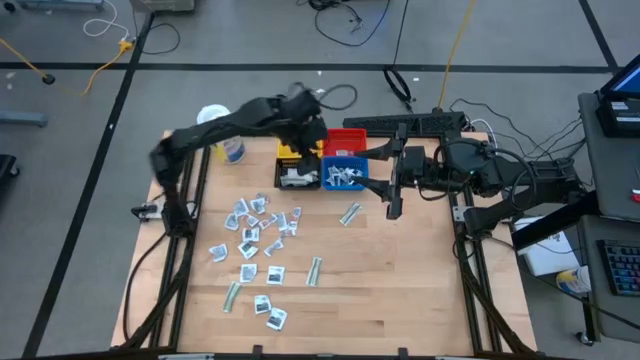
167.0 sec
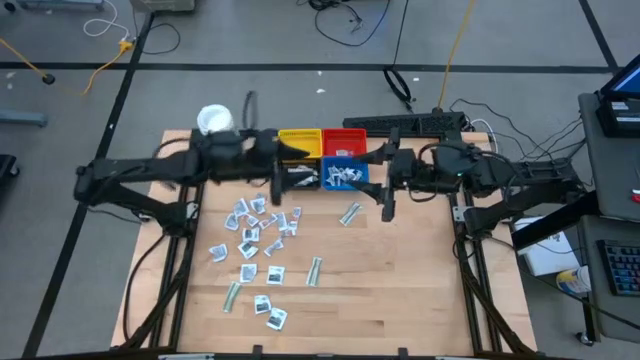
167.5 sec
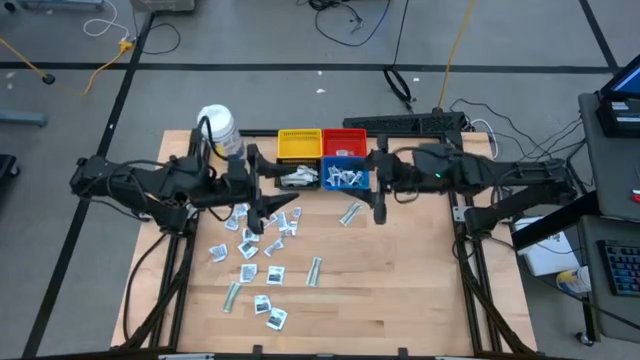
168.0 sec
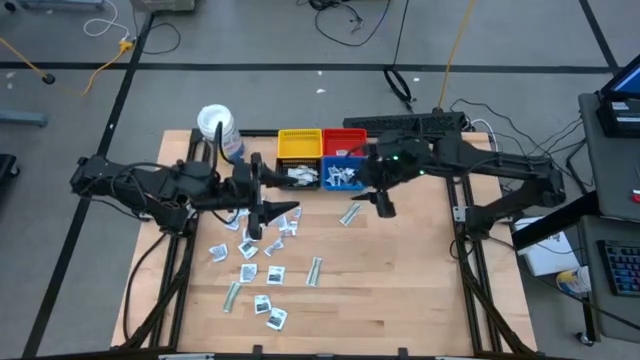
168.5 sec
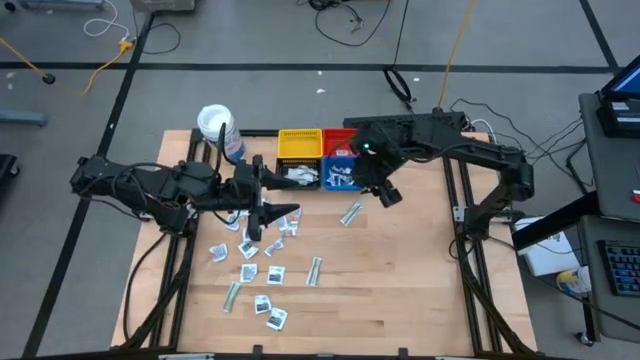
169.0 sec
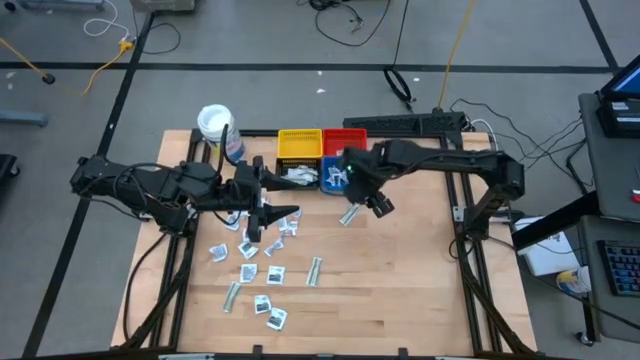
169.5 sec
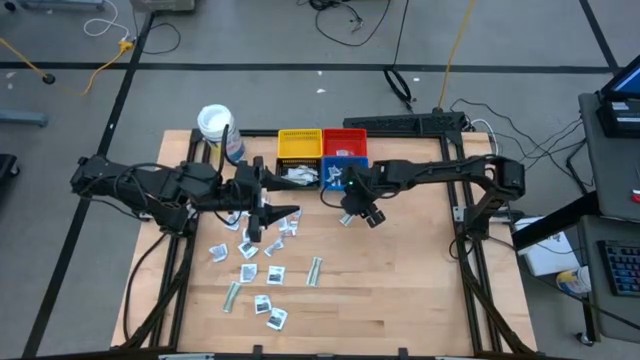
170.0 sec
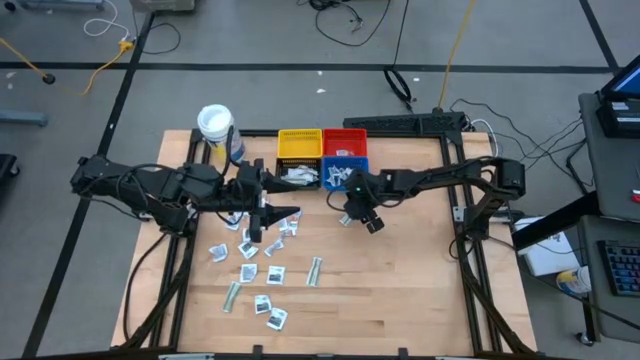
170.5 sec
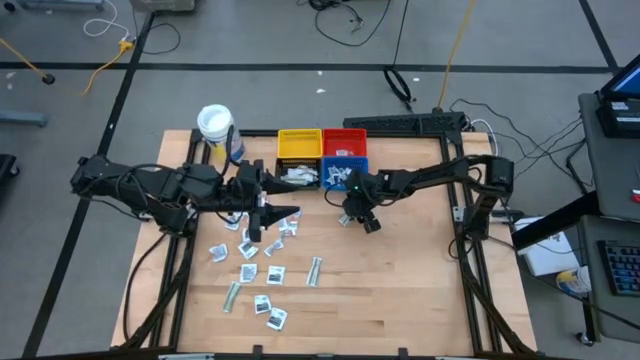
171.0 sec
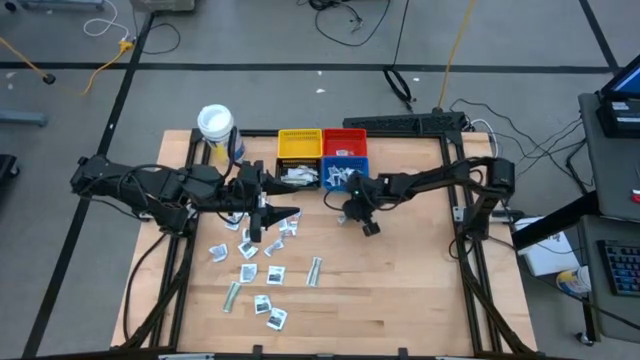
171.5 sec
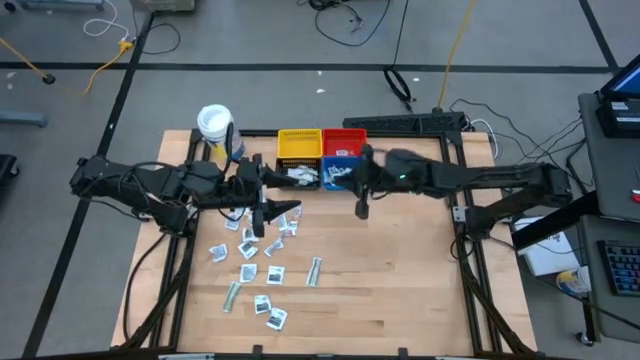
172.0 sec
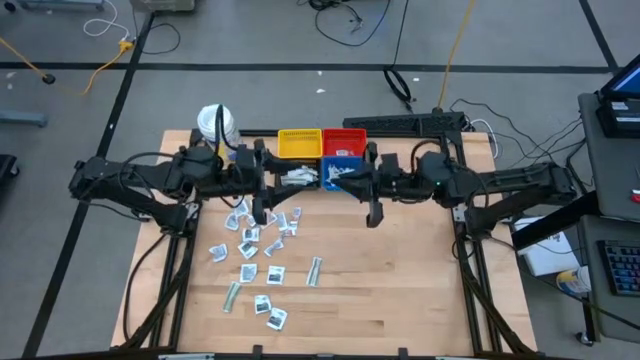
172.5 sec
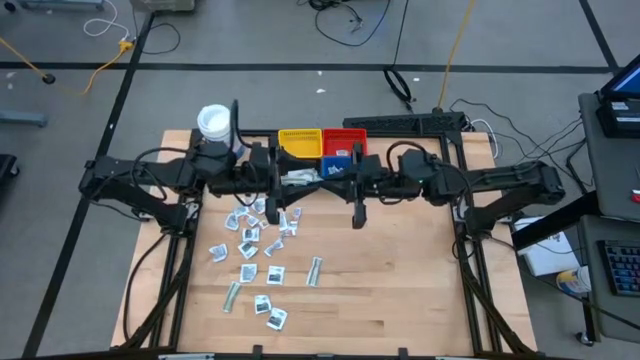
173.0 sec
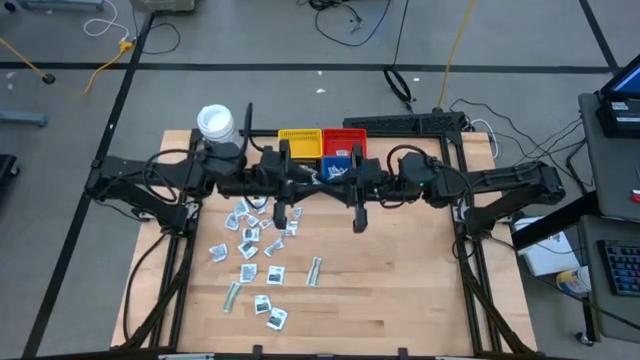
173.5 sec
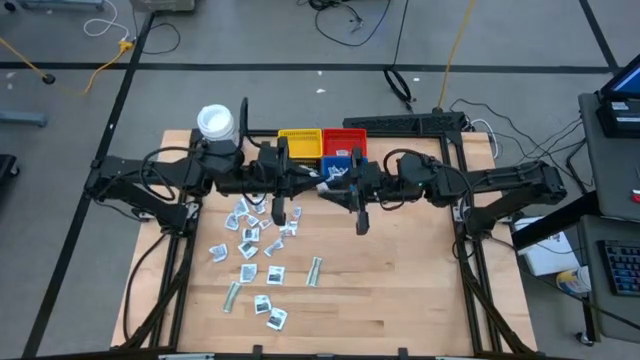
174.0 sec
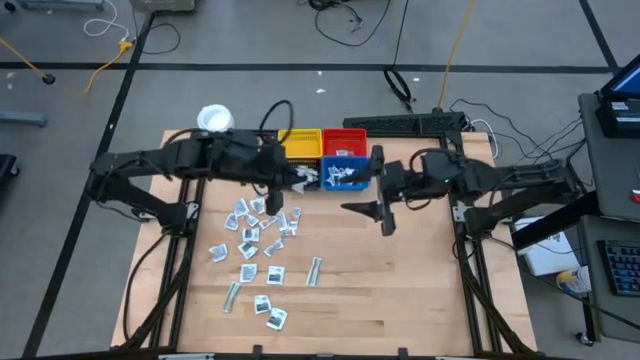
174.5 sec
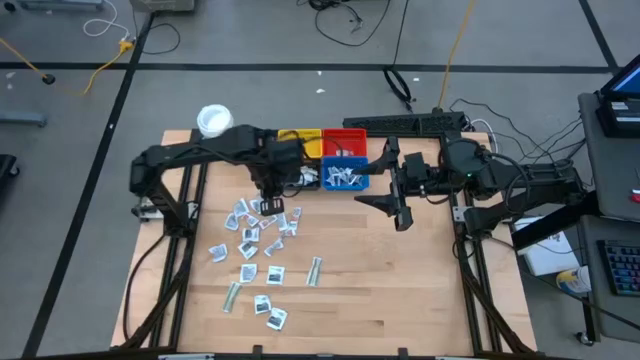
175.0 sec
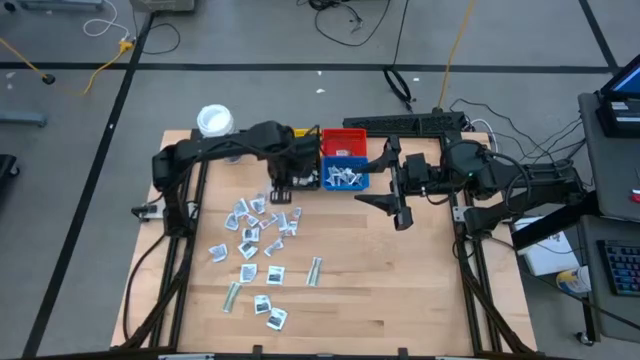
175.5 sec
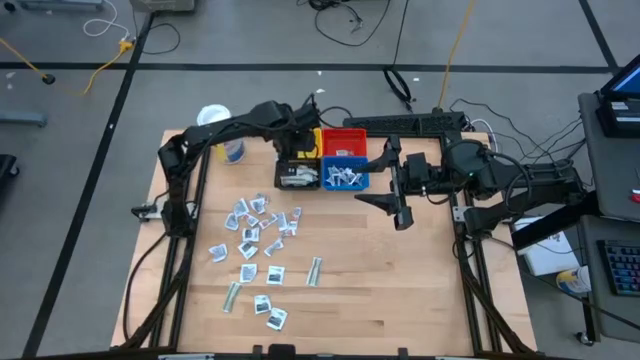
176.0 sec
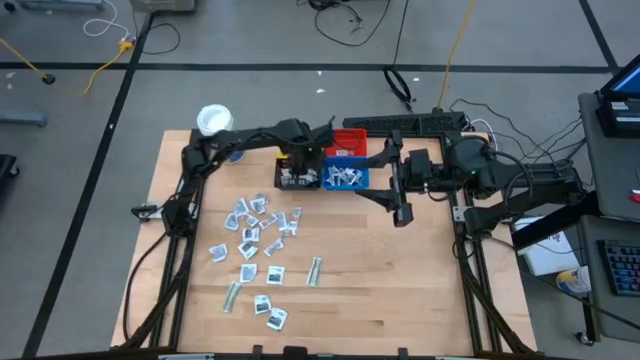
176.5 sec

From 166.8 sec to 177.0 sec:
Task: Pick & Place First Aid Supplies
Put the green bandage pack into the black basket

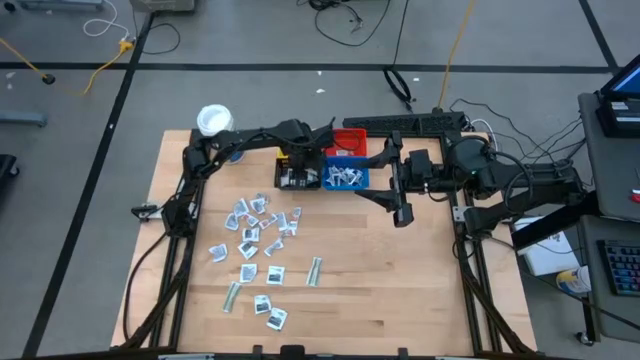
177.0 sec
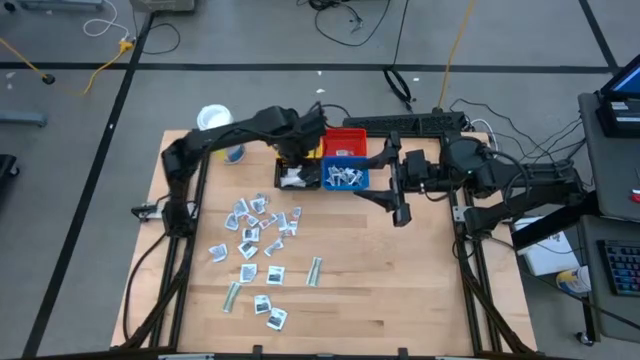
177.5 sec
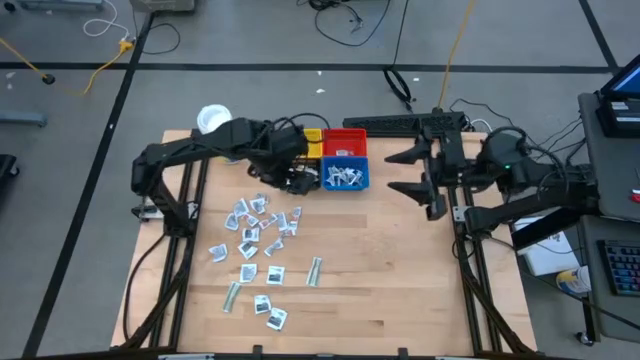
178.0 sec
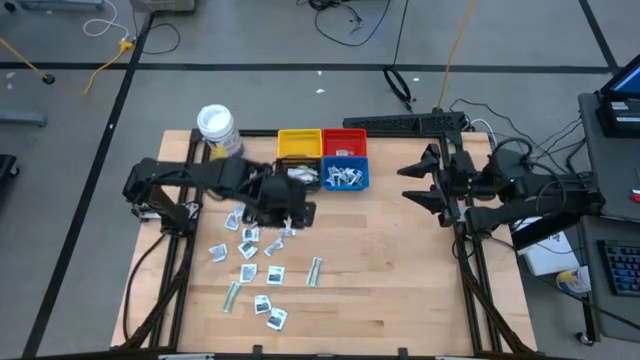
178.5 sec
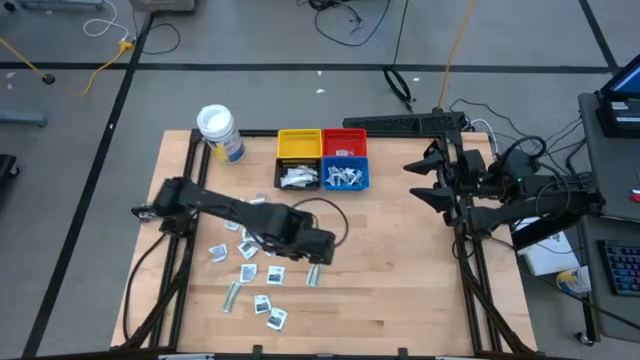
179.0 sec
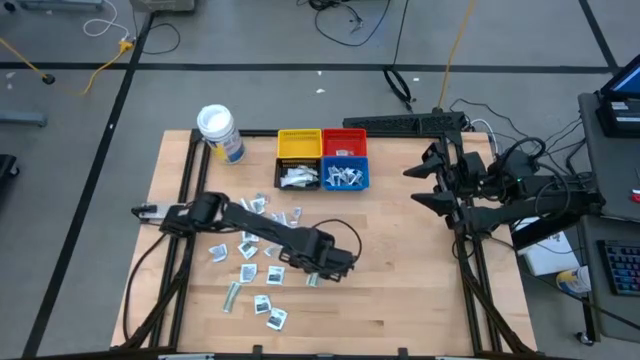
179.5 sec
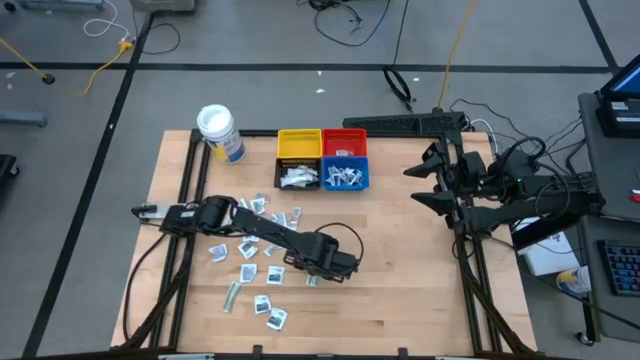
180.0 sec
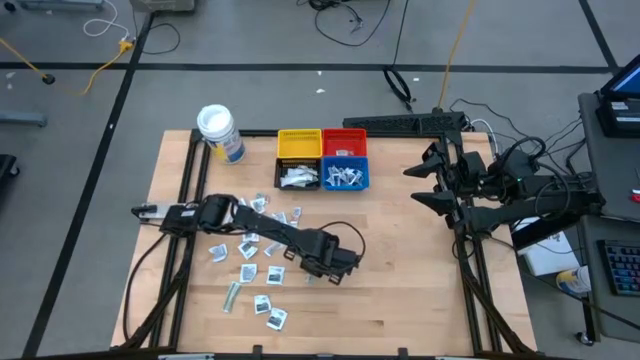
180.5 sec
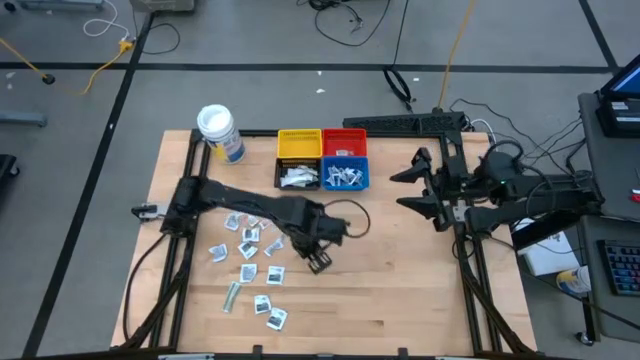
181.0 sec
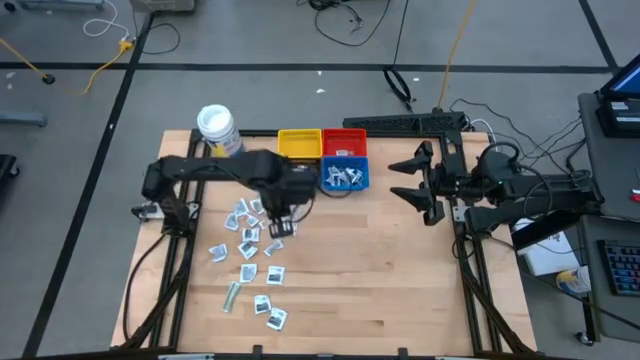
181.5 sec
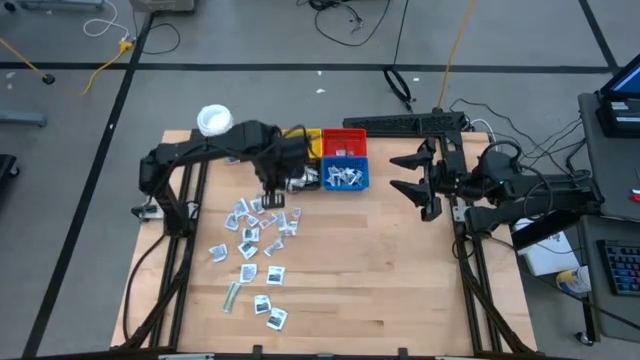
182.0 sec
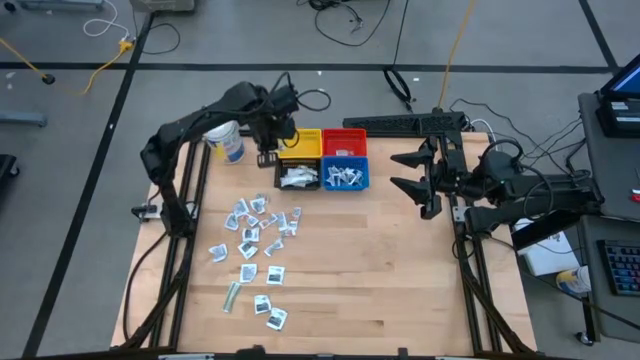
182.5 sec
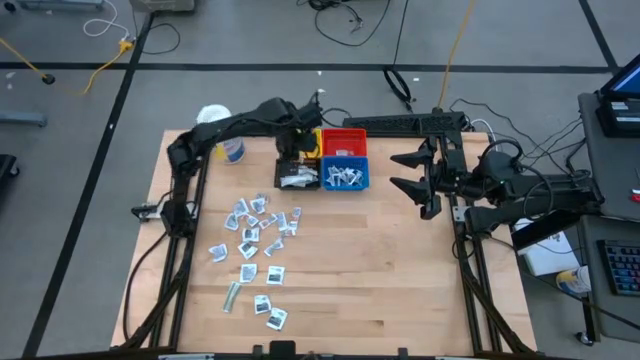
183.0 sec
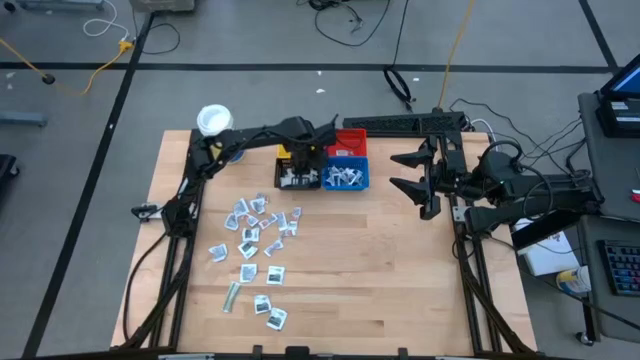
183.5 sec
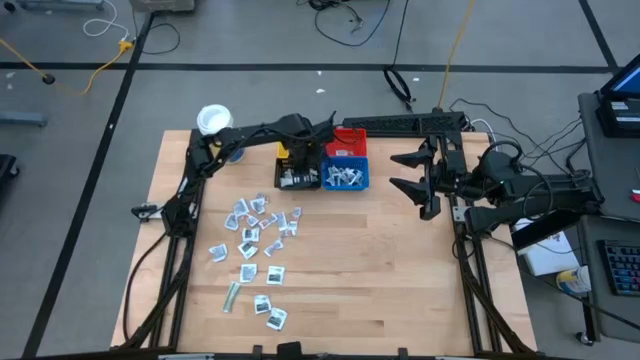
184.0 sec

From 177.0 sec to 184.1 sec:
Put the green bandage pack into the black basket

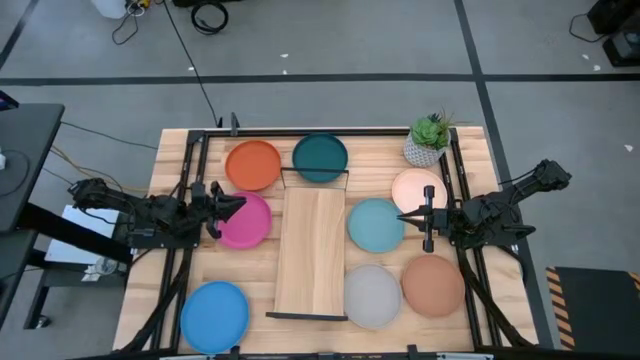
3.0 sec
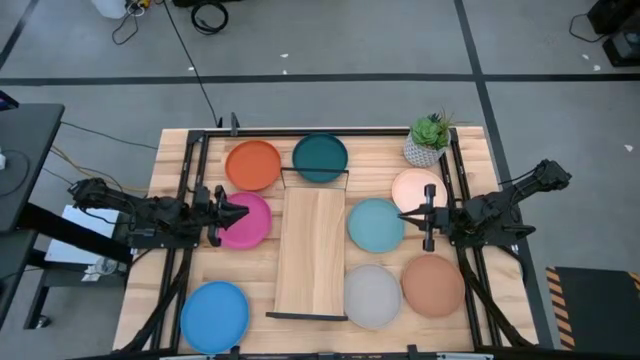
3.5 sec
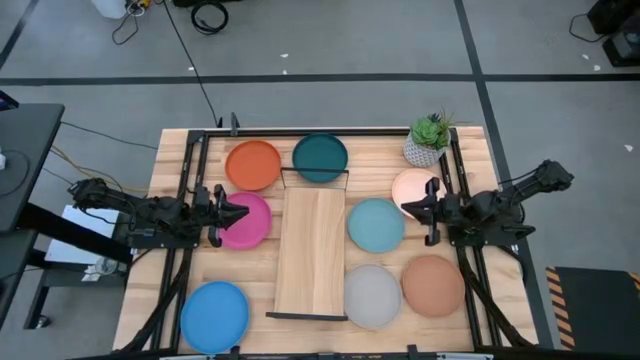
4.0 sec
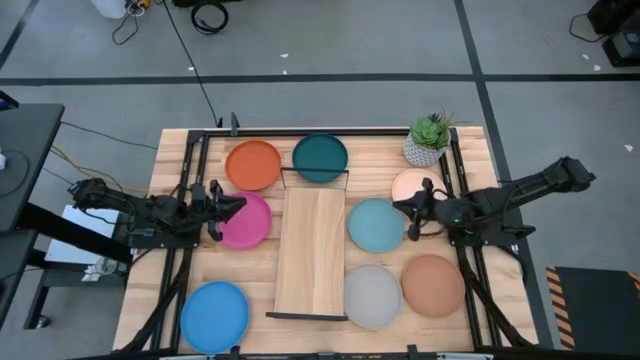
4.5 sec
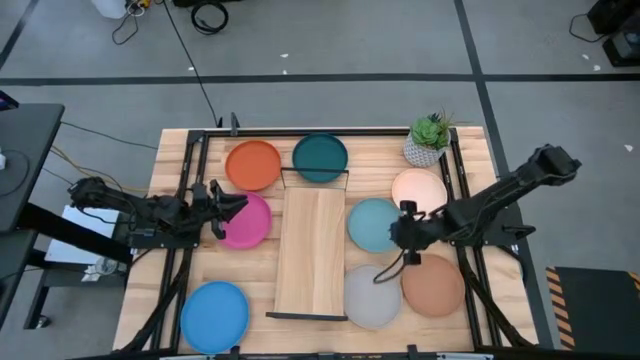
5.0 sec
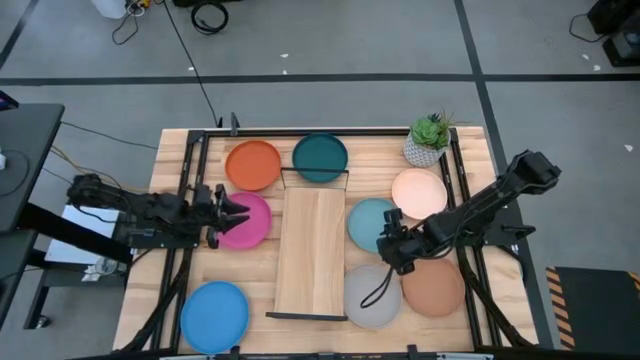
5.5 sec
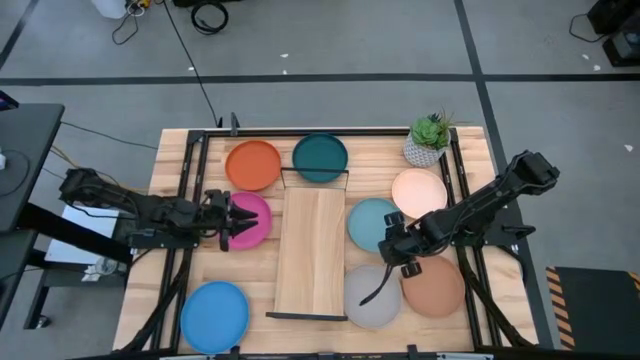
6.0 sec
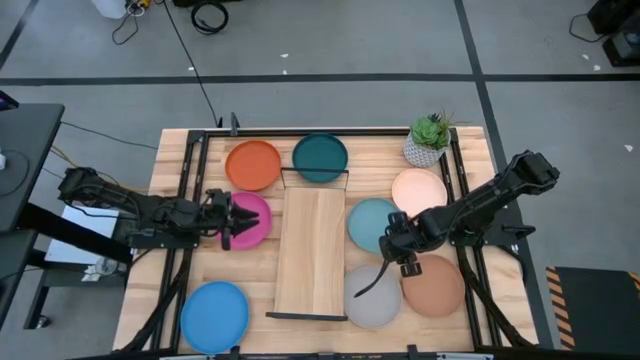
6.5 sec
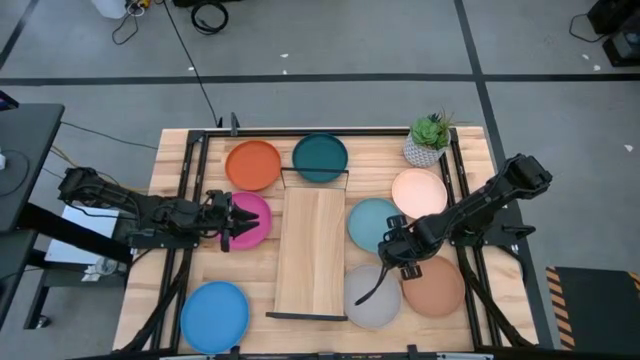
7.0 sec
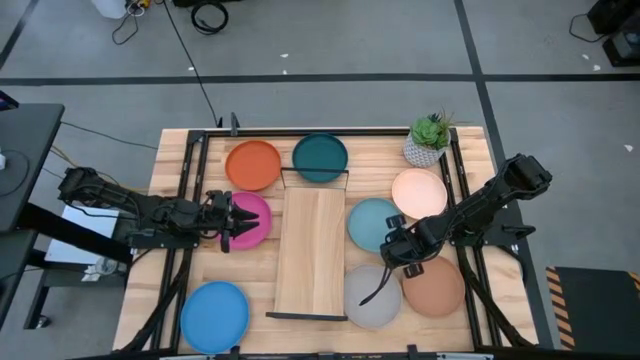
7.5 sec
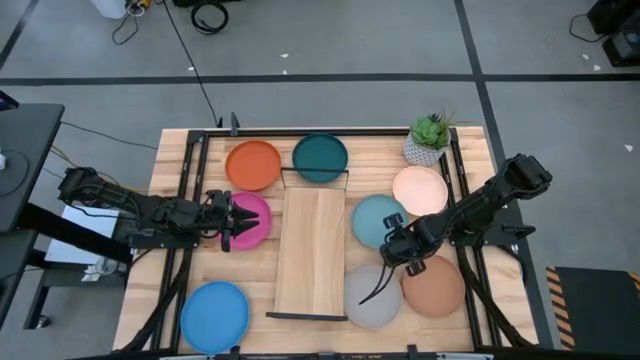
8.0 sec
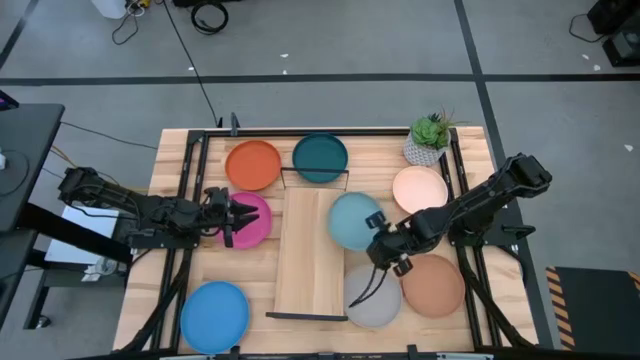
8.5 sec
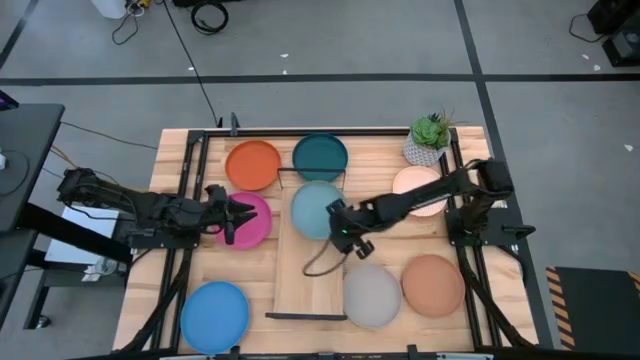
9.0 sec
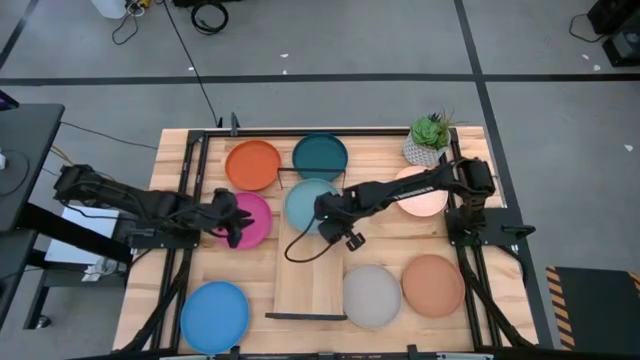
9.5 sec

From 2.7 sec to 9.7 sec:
Task: Place and stack plates onto a shelf
Put the light blue plate on the shelf
